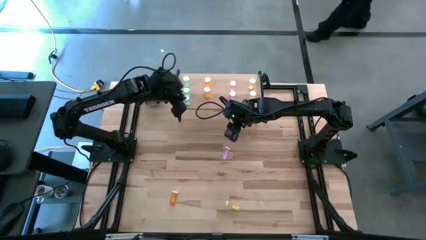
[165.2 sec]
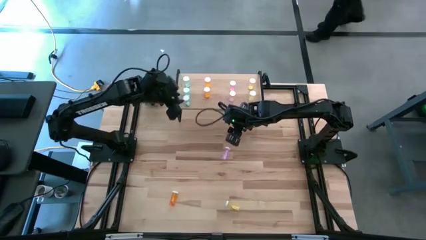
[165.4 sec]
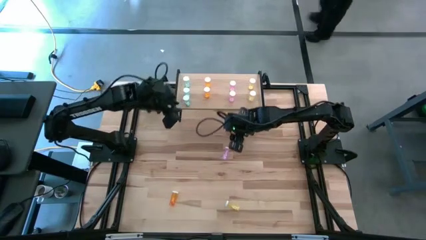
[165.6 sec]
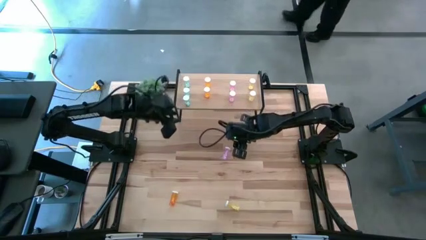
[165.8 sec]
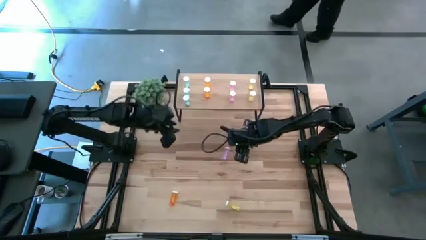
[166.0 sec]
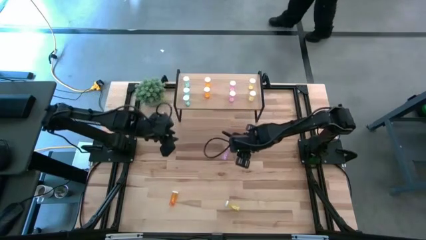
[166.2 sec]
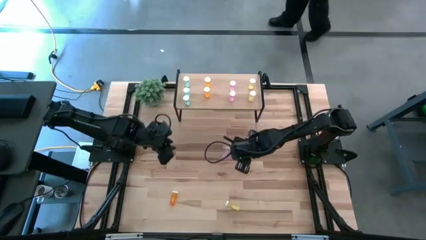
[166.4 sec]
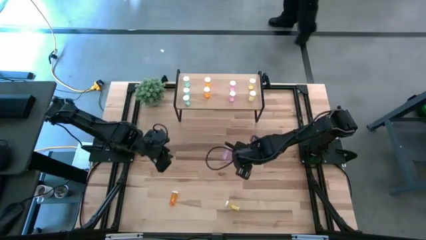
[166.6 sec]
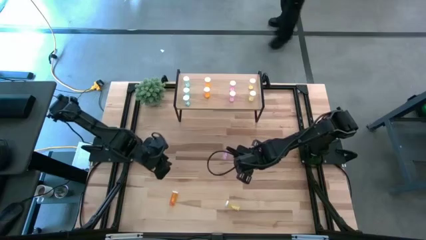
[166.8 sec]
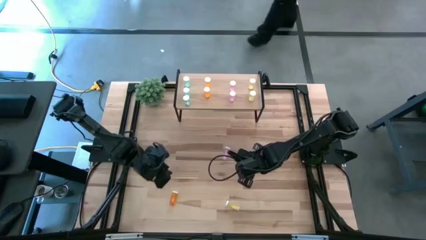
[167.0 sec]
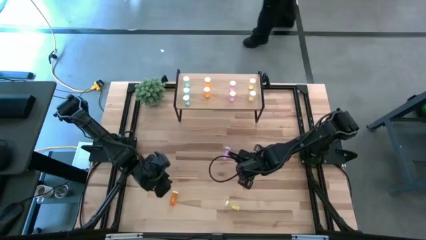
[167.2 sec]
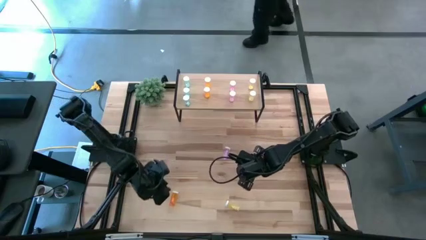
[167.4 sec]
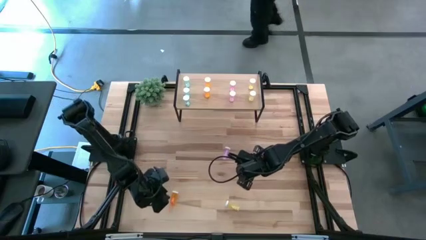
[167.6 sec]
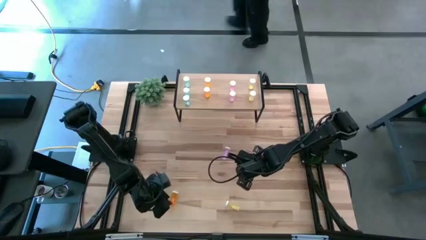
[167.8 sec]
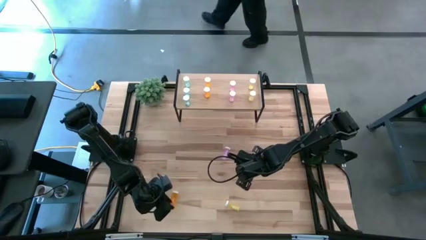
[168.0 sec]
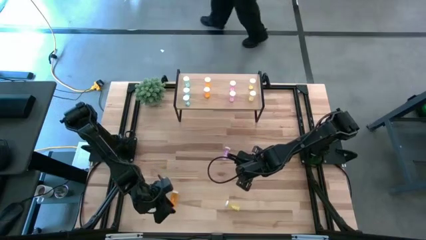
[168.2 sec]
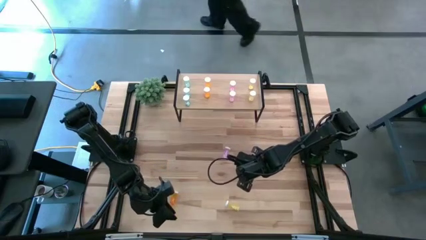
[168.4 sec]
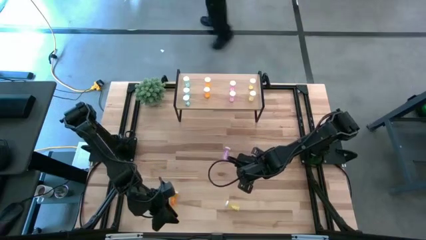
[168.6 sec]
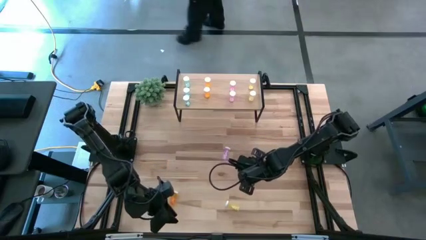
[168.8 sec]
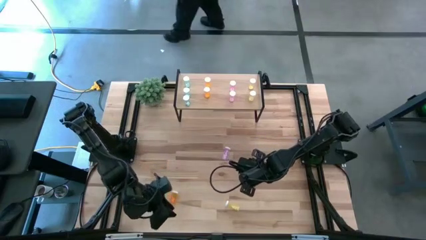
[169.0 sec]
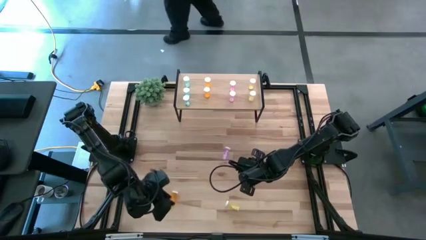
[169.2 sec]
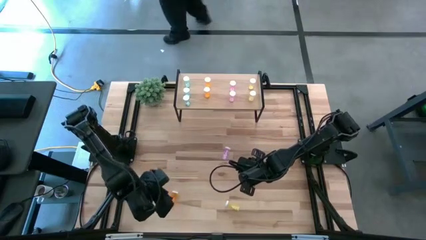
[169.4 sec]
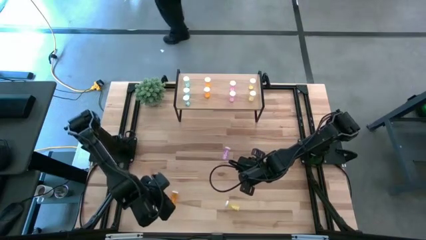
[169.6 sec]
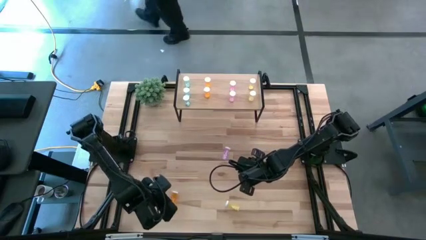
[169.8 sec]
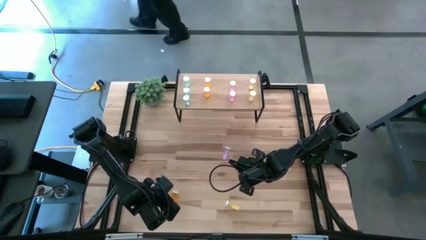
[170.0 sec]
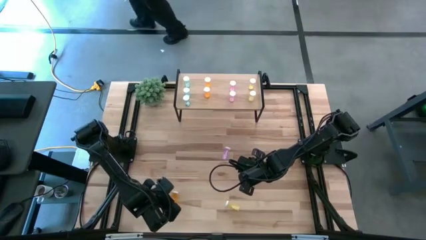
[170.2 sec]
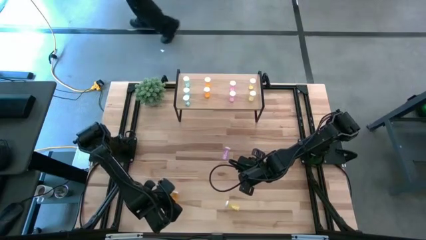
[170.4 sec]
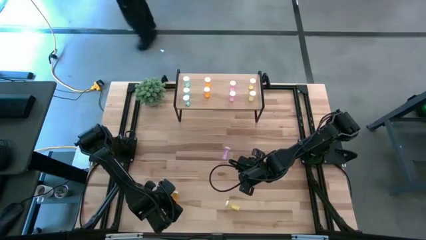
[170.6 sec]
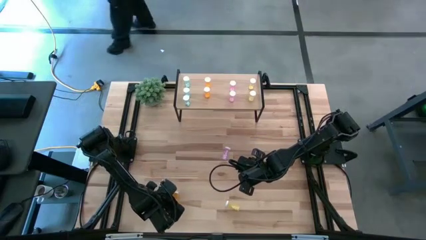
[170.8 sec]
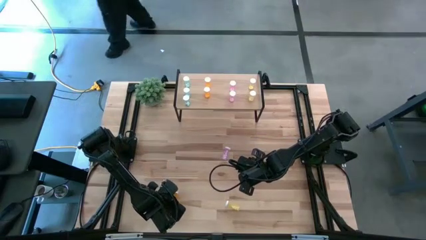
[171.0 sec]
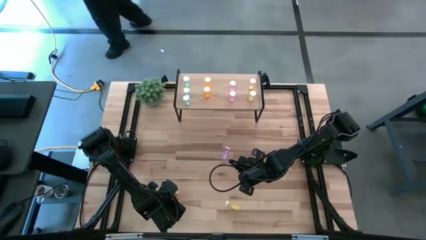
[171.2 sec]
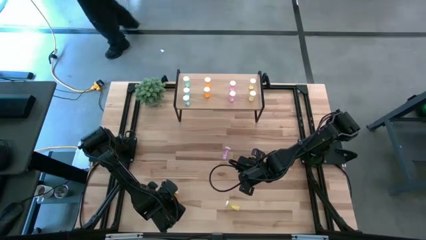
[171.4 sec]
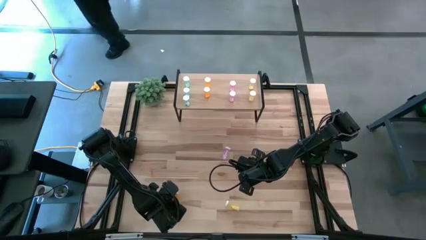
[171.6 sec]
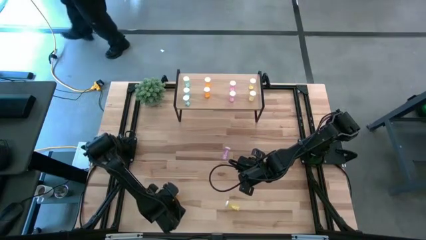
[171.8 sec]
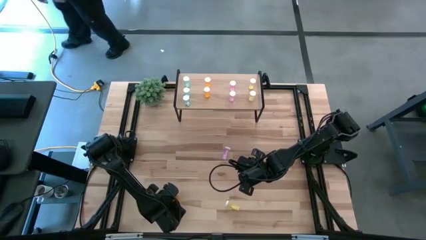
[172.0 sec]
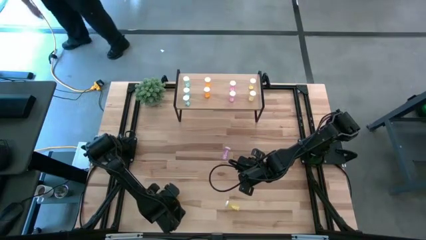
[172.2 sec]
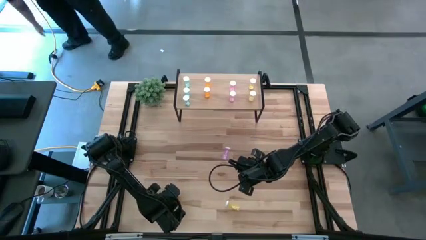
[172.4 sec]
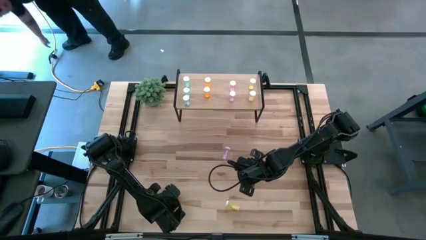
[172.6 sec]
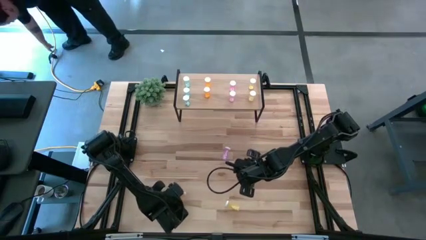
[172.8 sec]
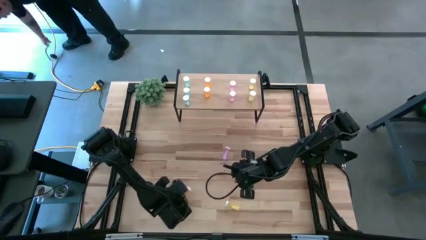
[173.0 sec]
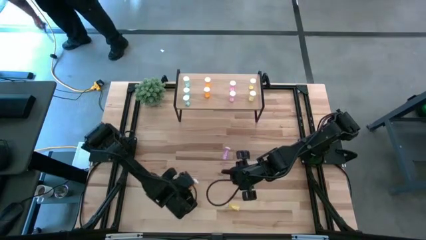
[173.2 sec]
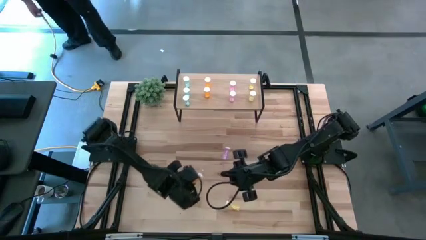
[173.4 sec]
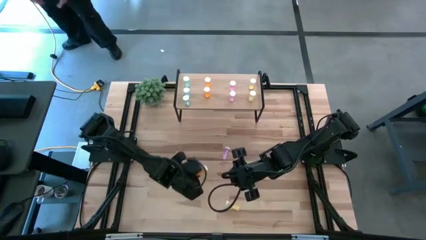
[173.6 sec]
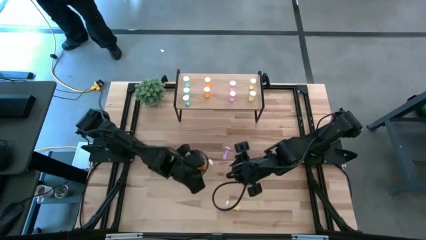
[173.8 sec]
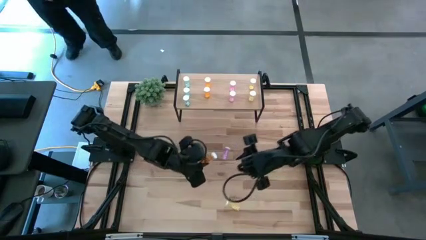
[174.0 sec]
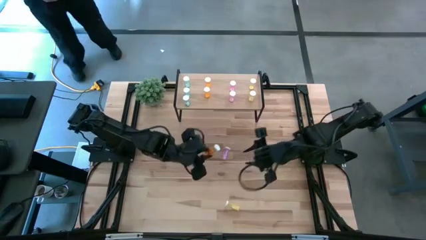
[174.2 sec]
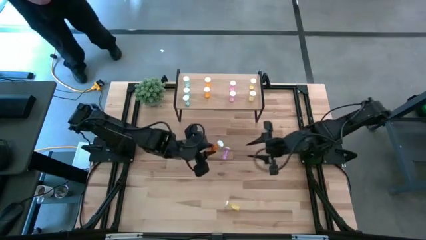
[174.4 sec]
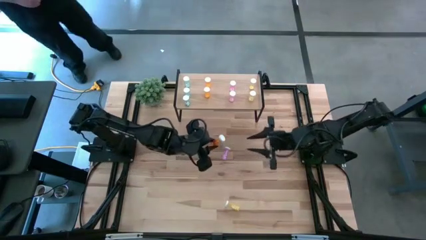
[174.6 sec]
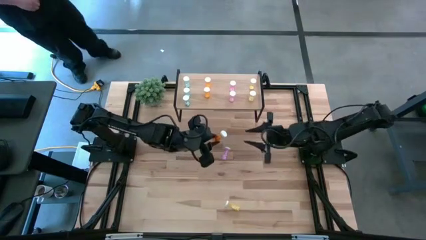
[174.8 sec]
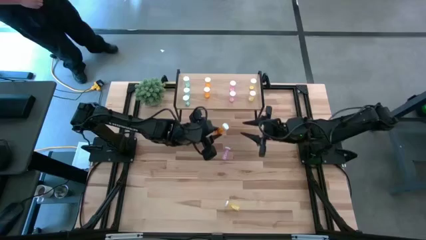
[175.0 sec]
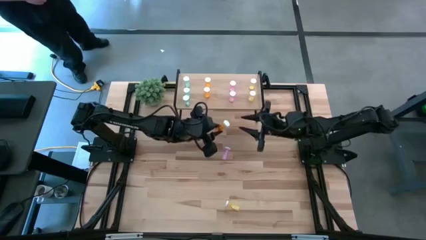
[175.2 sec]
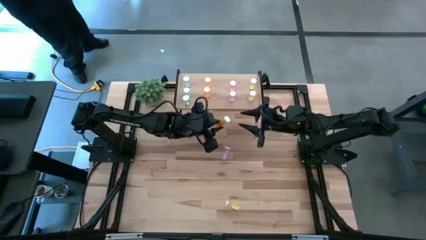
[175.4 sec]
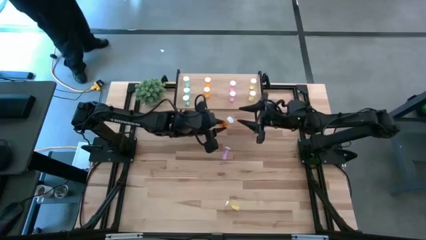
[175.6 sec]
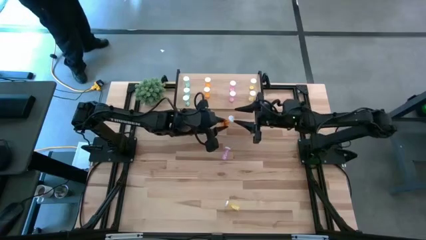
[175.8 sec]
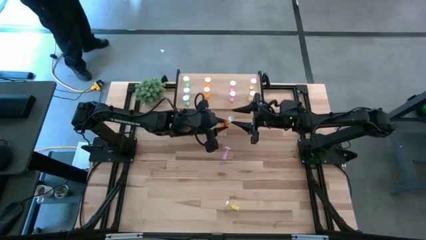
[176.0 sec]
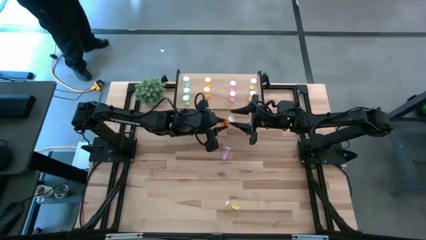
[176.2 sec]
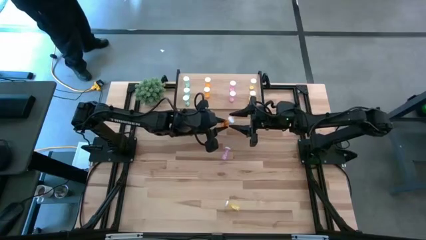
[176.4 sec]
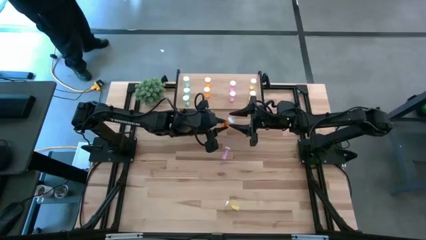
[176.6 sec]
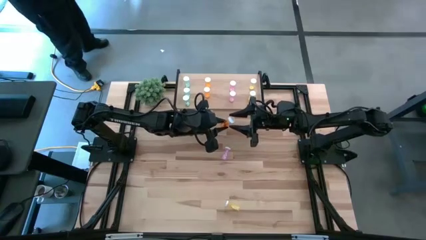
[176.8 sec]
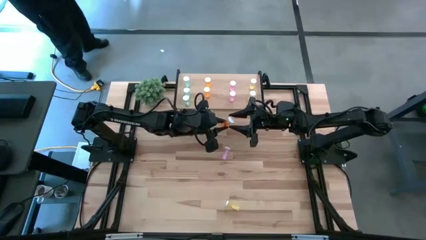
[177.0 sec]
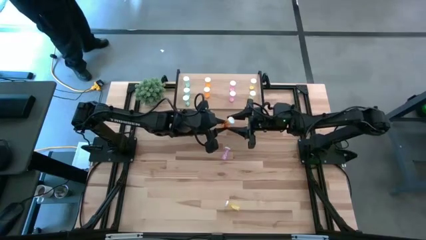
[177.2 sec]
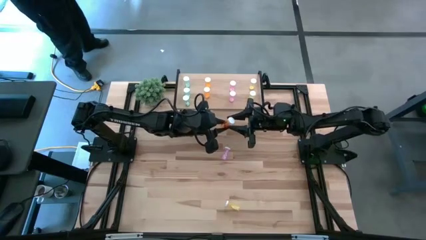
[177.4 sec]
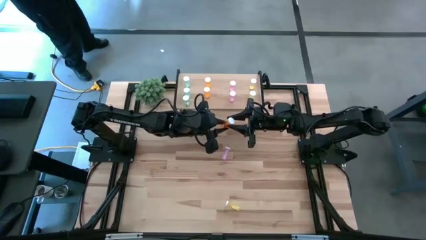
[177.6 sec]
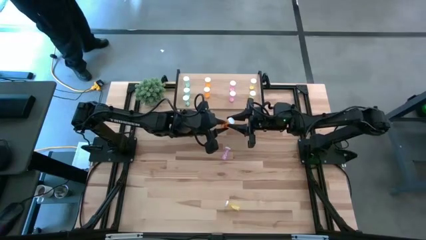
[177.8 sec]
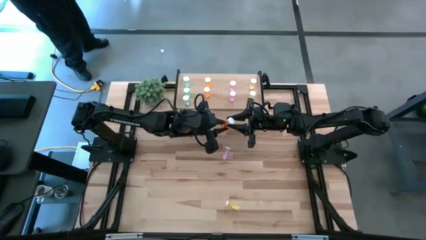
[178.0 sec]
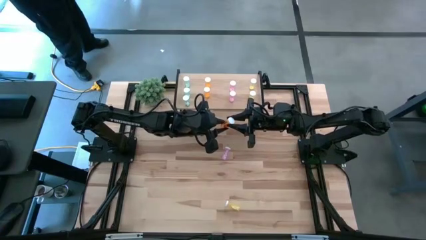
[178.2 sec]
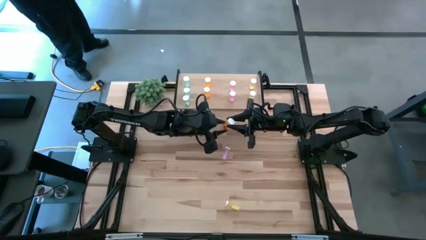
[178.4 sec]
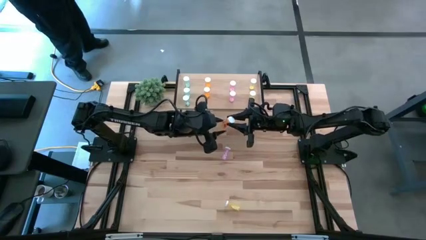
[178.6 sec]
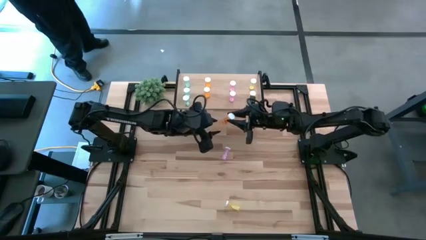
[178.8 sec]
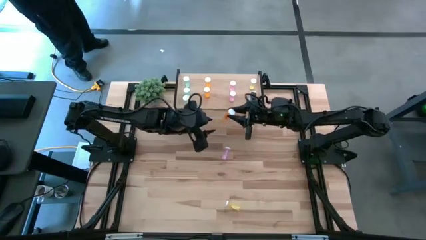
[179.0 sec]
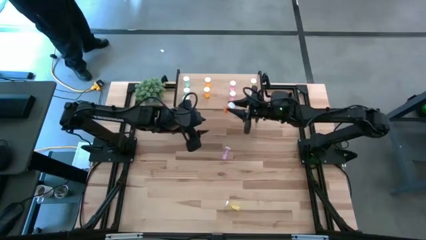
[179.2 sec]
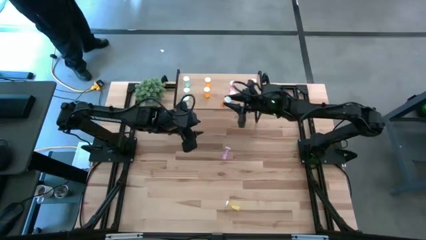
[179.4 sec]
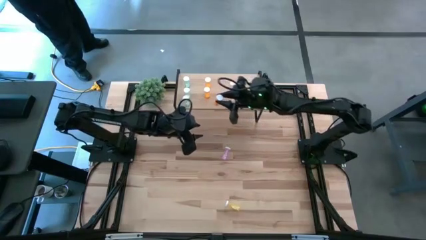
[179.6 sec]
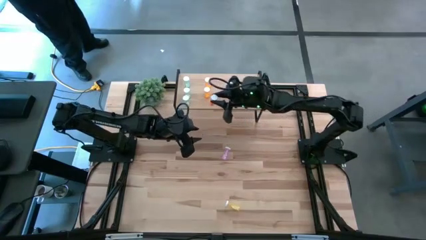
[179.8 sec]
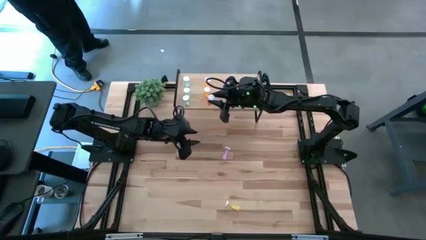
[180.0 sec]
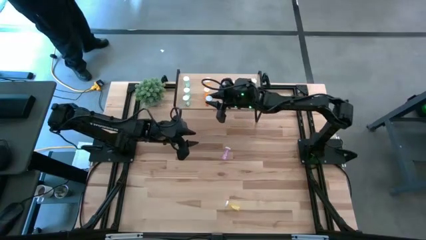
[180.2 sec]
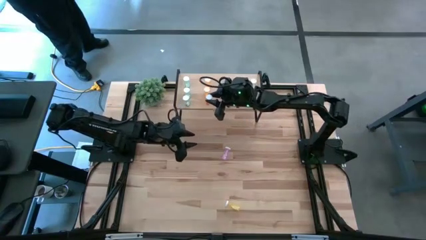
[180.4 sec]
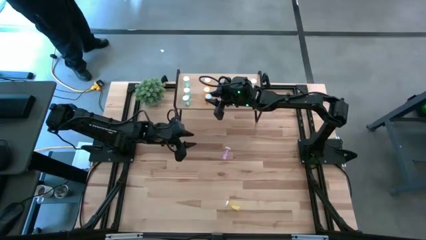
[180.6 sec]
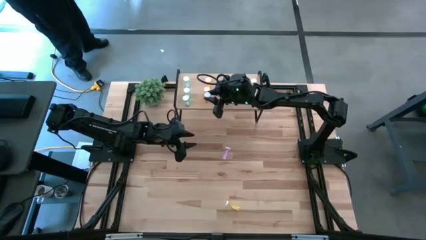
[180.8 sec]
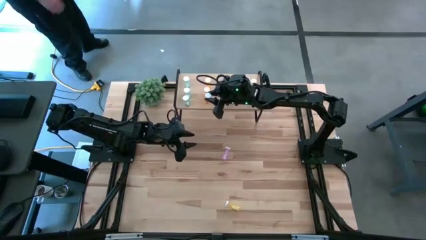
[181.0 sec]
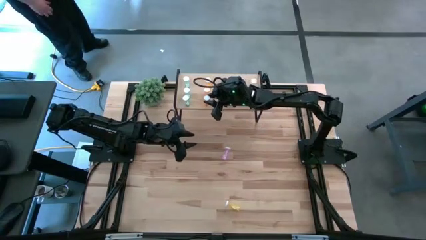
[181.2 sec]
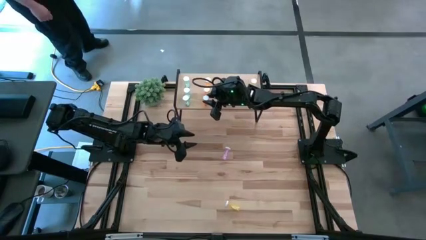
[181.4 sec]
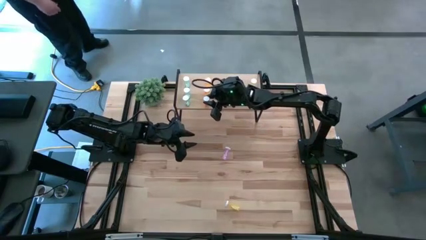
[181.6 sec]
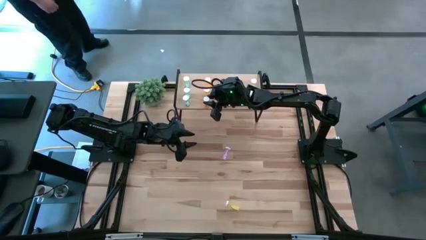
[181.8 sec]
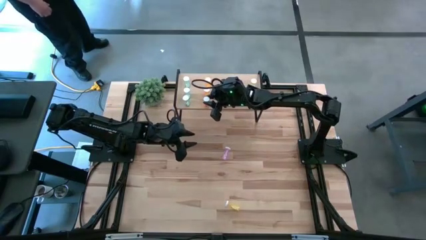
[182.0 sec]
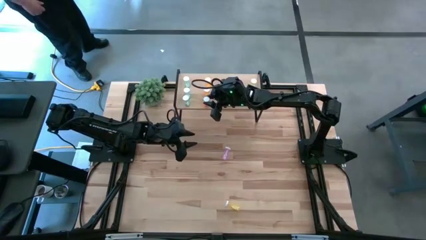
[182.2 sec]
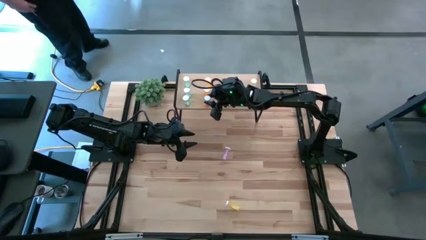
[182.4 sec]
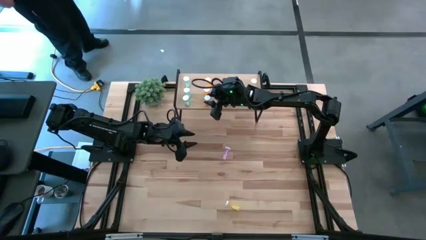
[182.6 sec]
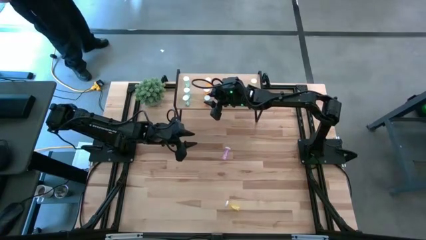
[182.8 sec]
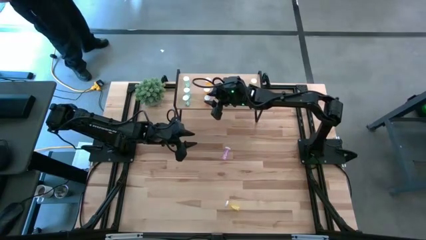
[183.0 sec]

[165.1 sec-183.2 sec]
Task: Pick and place medicine bottles onto shelf by color
Put the orange pill bottle on the shelf aligned with the orange pill bottle
